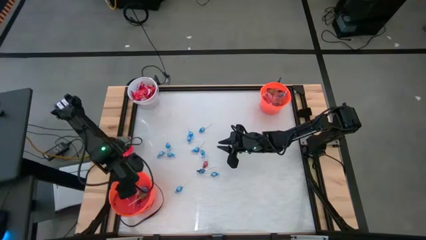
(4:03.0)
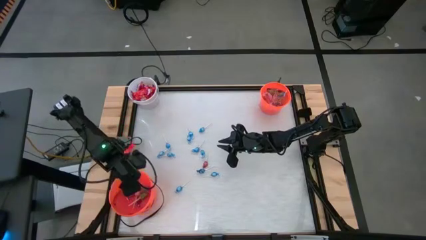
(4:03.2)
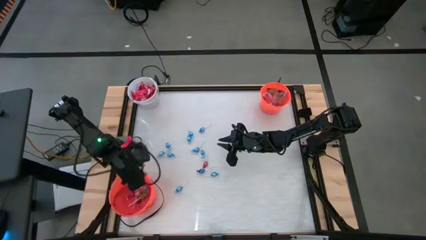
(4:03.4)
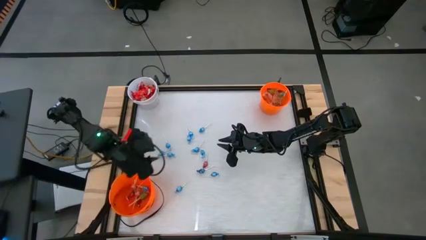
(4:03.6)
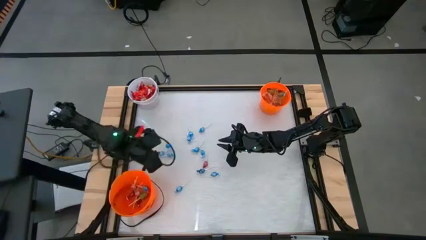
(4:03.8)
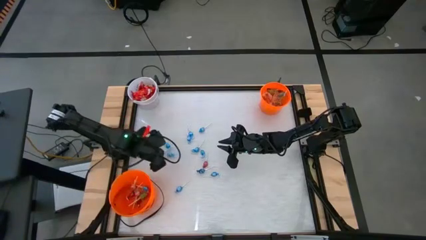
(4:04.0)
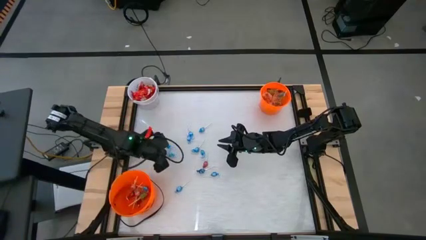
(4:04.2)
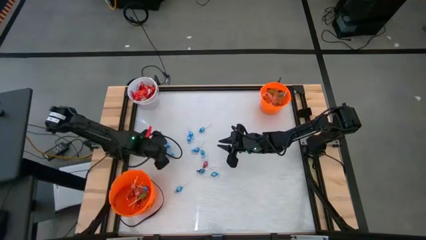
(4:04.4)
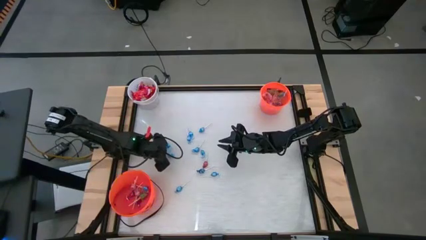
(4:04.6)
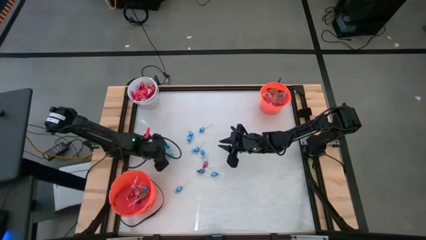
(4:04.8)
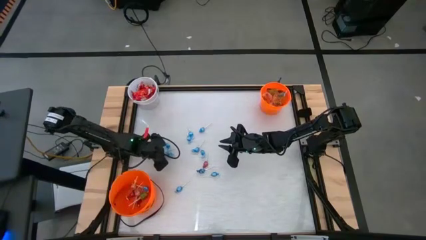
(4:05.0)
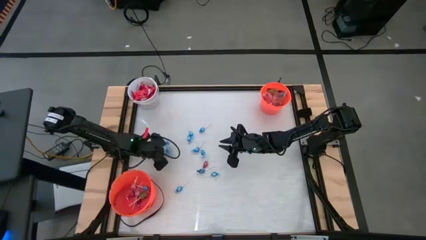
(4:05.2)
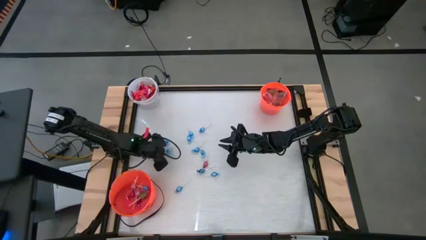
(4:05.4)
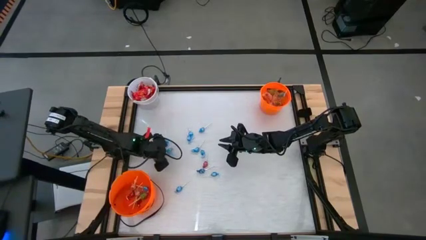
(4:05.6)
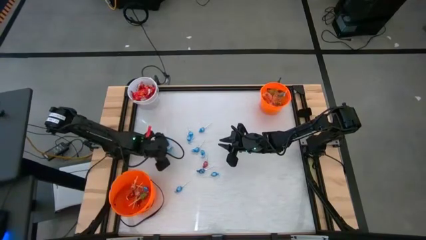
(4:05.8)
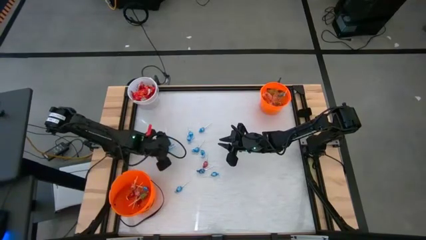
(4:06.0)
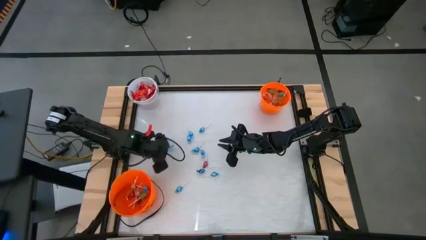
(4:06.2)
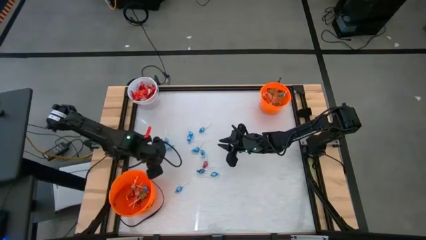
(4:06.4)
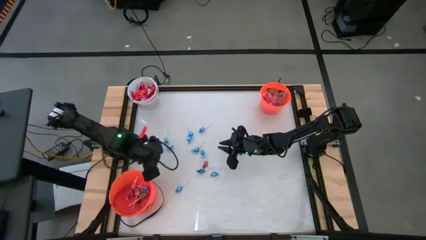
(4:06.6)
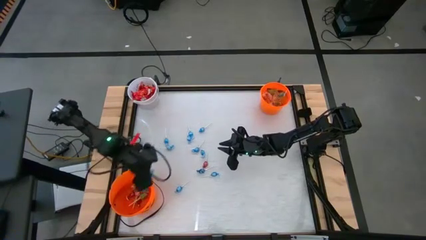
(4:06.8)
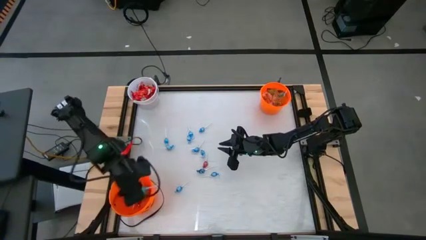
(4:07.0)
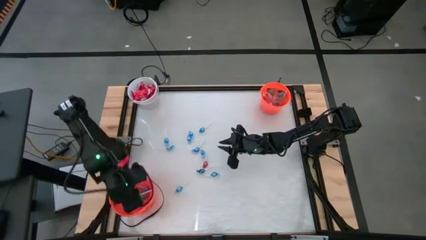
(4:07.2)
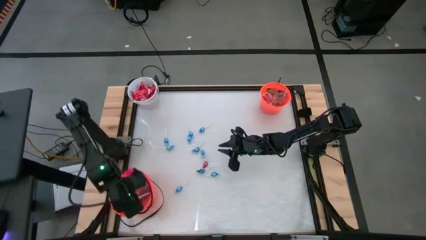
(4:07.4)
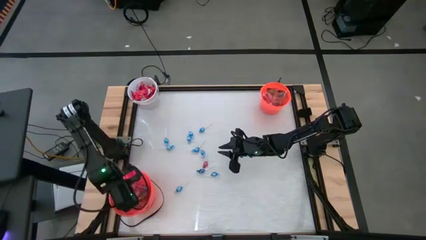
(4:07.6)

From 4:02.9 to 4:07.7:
Task: Sort candy by brand, put in halloween buckets
Put the blue lollipop into the bottom orange bucket

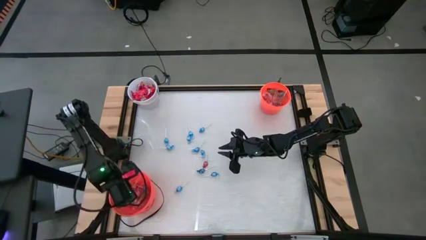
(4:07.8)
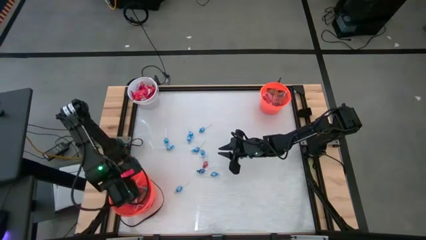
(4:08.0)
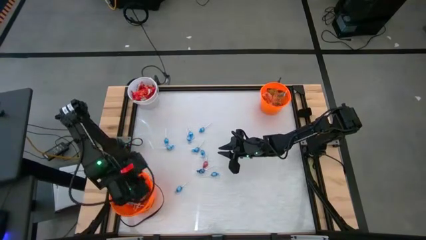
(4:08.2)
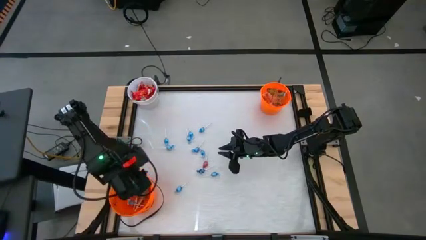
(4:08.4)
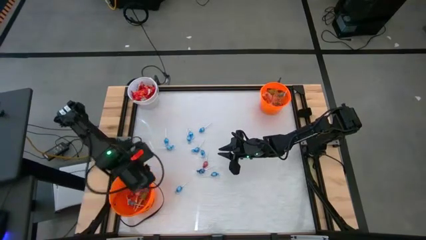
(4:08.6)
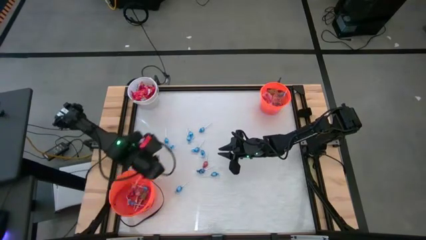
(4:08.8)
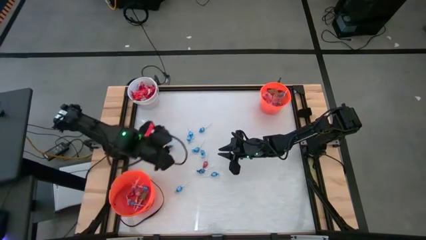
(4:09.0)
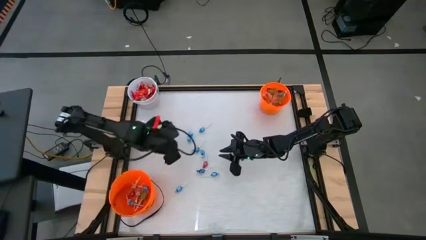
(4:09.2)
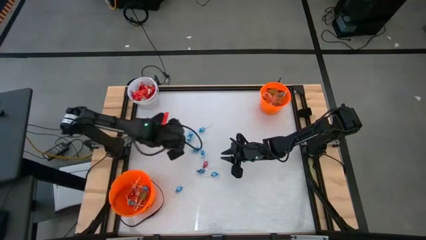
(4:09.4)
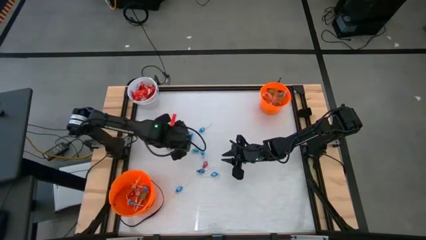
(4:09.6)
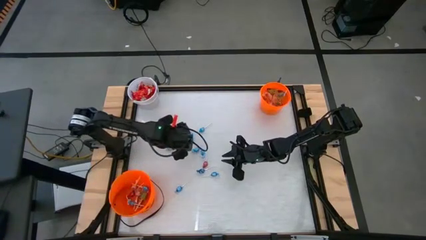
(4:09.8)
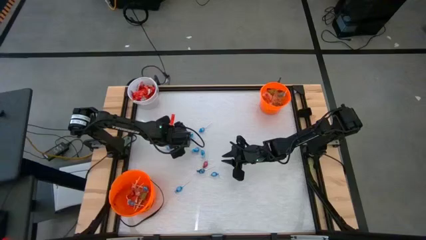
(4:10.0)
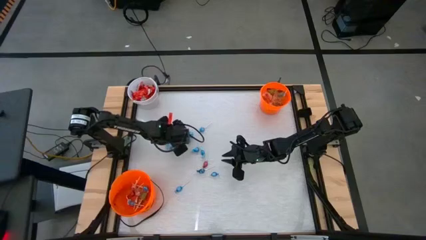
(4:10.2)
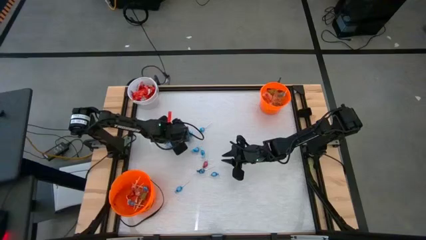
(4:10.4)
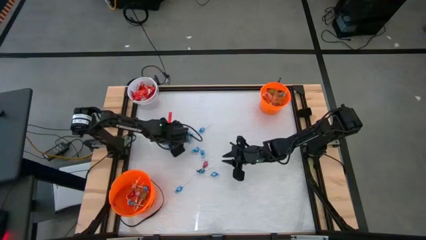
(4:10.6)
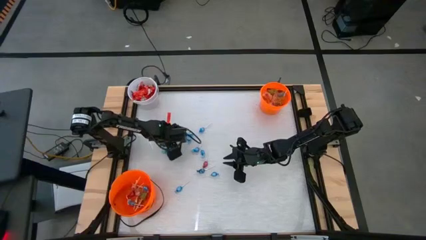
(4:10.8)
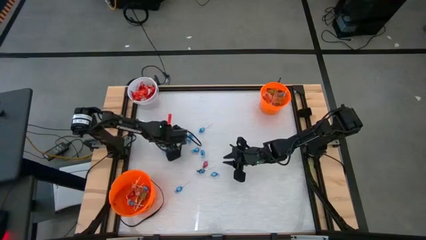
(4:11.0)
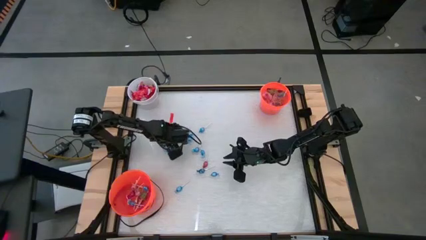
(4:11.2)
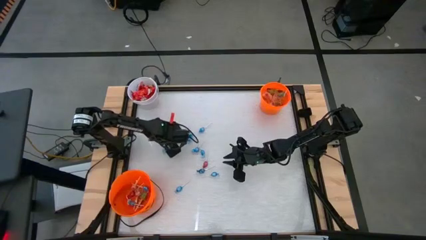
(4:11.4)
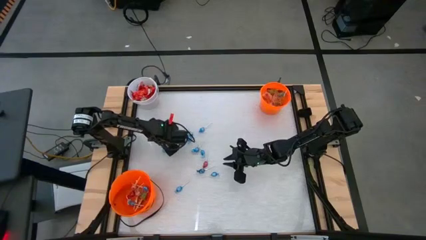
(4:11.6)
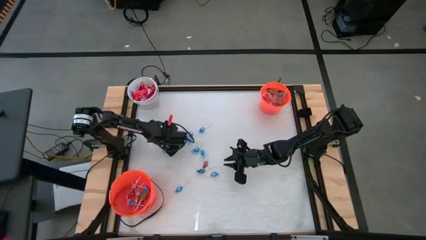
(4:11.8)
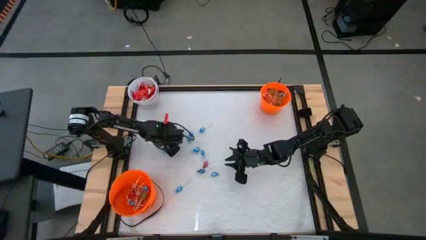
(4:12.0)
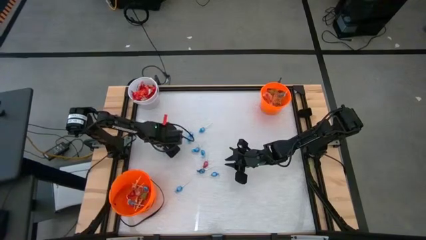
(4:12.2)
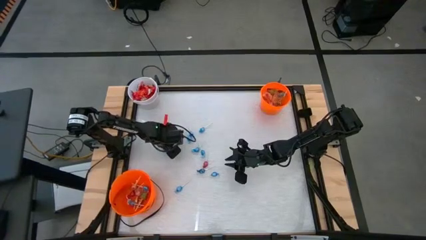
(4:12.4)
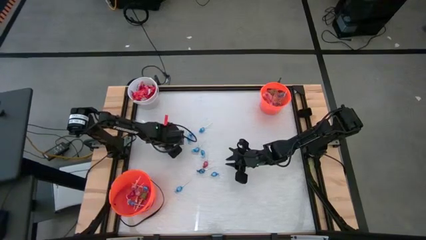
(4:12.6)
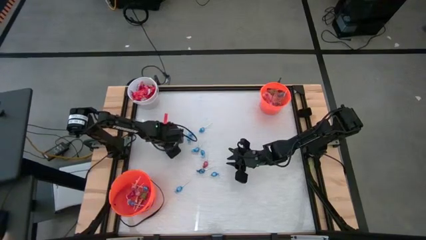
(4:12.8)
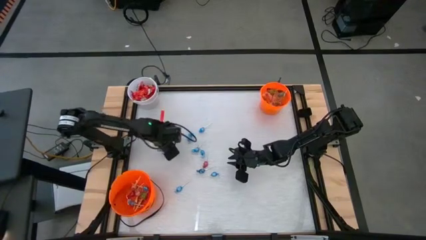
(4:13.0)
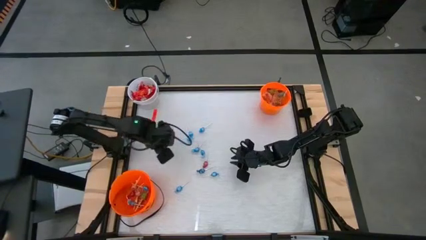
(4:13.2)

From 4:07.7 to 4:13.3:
Put the blue lollipop into the bottom orange bucket

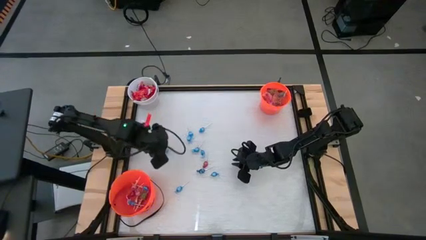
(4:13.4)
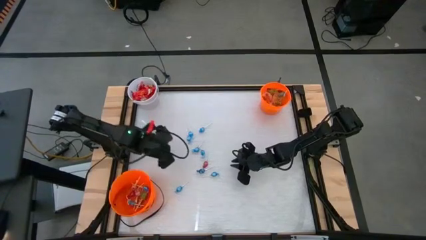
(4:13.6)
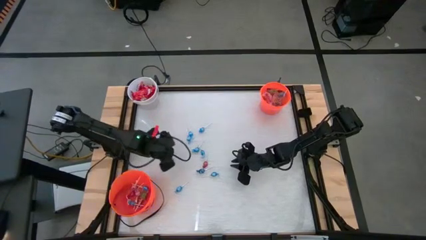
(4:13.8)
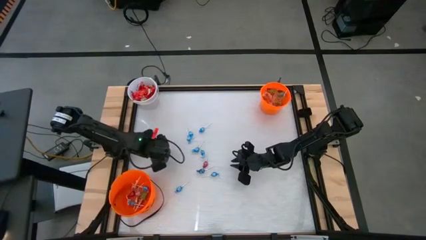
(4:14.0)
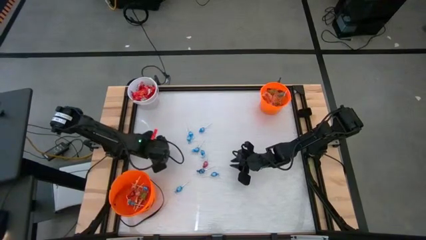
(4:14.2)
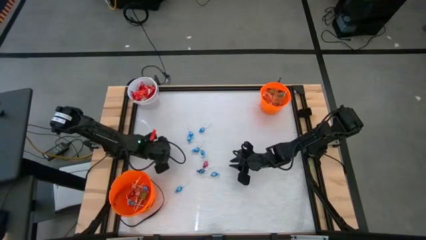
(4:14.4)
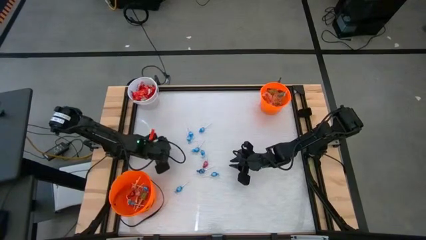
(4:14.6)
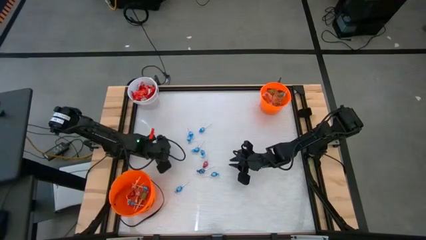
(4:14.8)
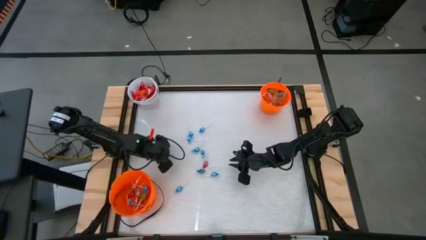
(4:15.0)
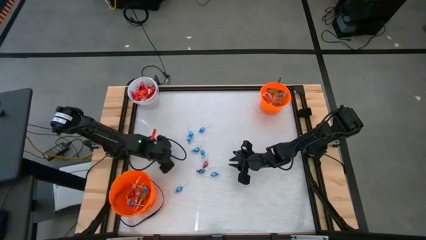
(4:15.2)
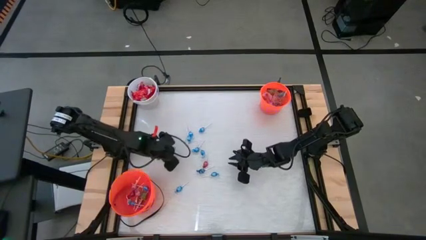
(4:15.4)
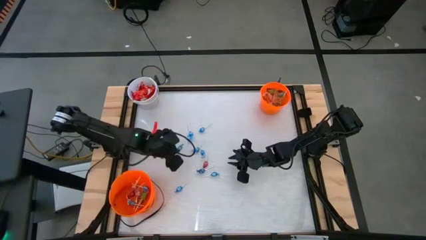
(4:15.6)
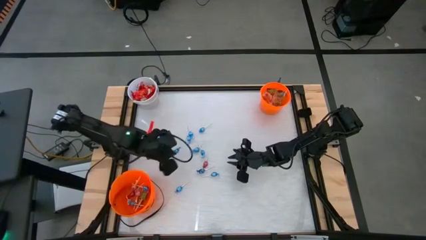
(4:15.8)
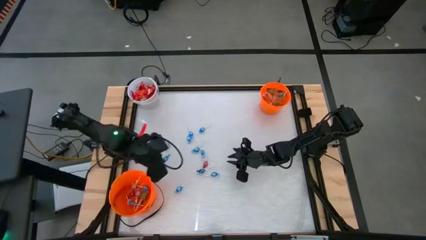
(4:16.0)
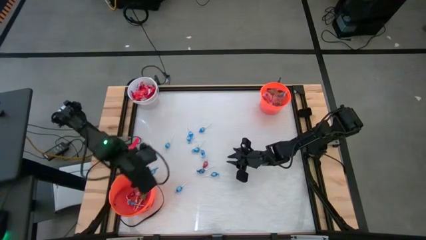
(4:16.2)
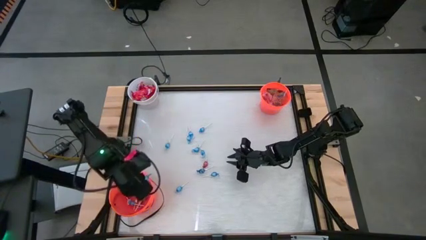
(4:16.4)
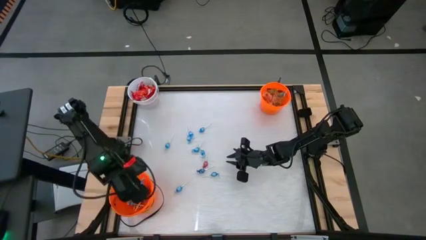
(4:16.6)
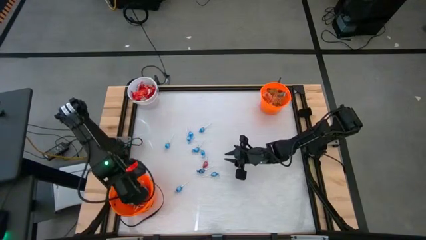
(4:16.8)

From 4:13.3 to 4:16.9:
Put the blue lollipop into the bottom orange bucket

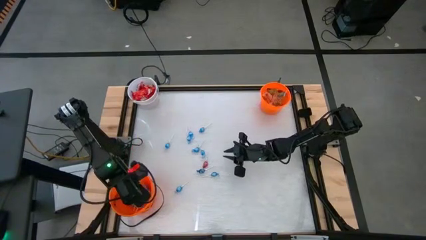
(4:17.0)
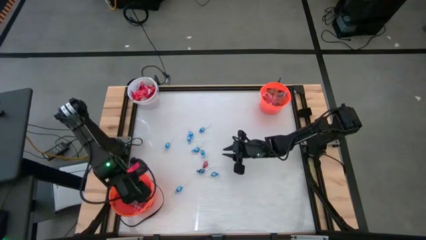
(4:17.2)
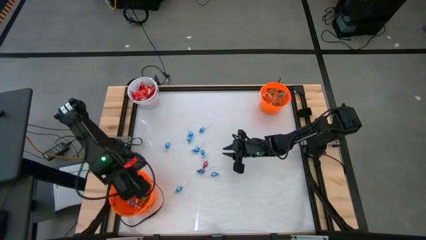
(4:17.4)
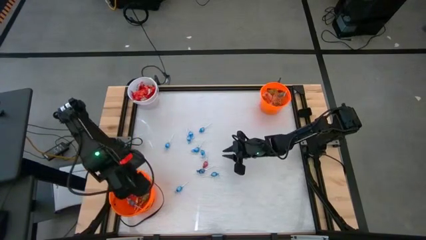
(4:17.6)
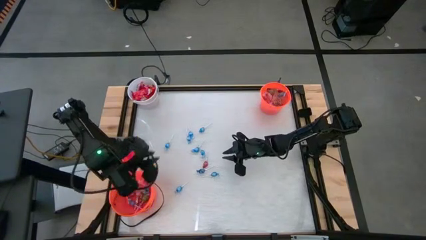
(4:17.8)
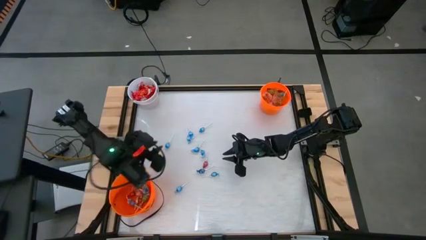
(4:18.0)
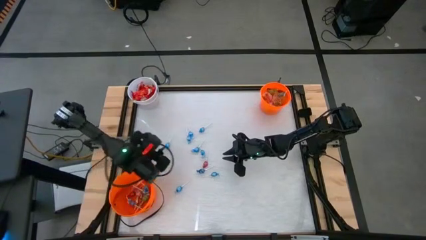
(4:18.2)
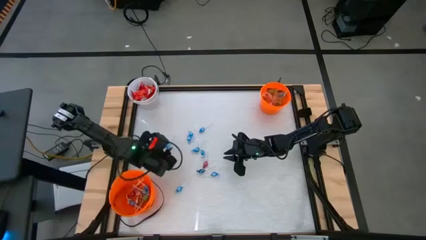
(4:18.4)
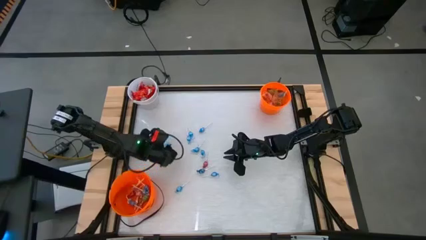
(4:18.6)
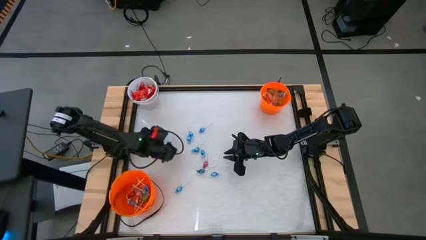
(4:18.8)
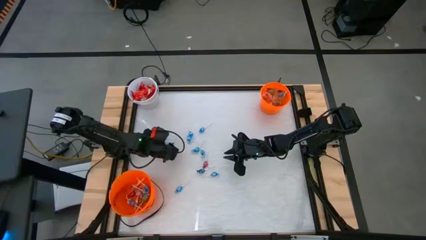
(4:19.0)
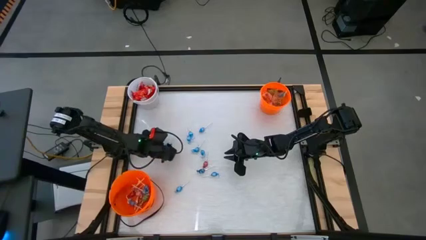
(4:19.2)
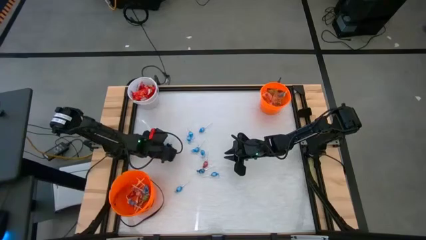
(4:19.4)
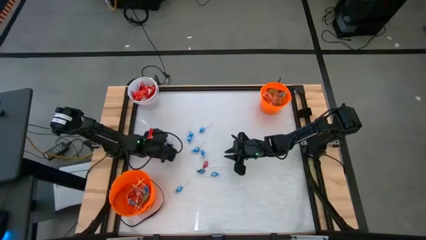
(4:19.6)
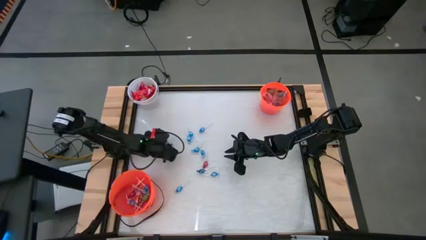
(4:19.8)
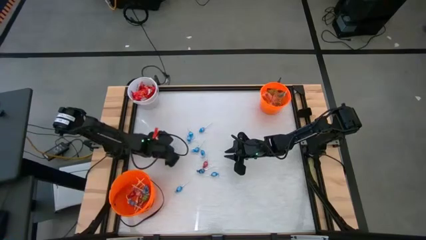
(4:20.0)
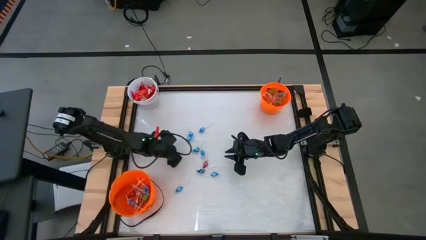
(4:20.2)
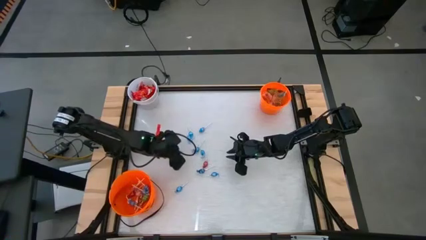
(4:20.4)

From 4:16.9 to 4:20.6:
Put the blue lollipop into the bottom orange bucket
